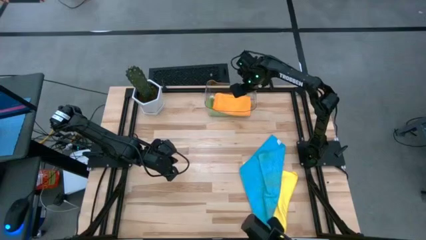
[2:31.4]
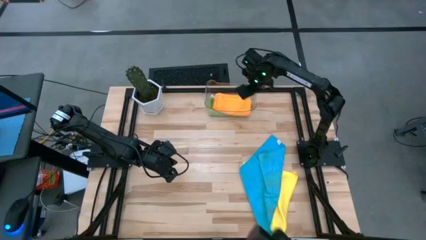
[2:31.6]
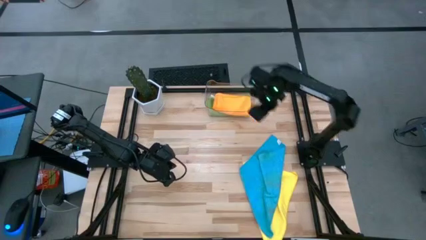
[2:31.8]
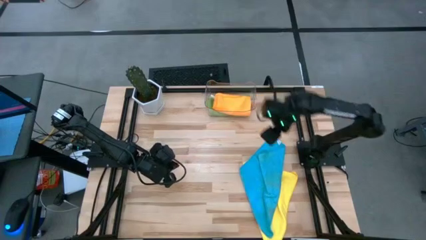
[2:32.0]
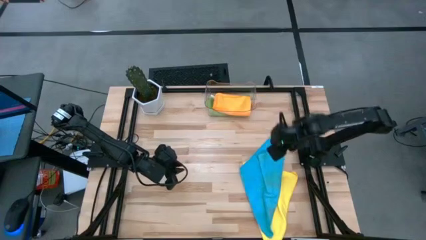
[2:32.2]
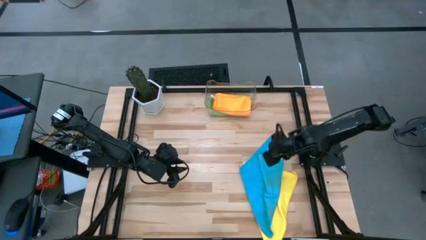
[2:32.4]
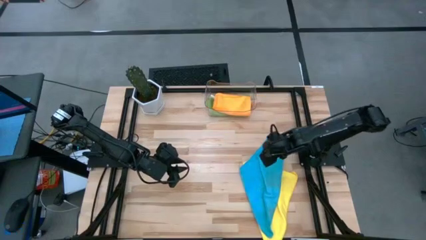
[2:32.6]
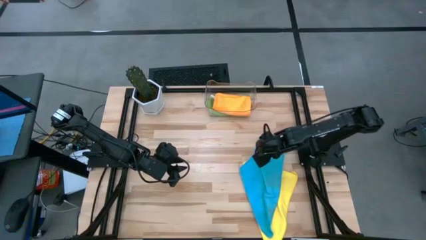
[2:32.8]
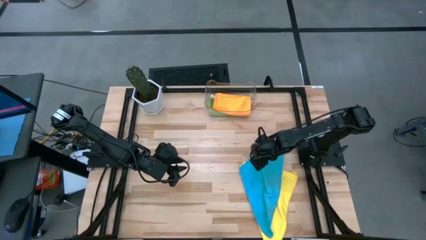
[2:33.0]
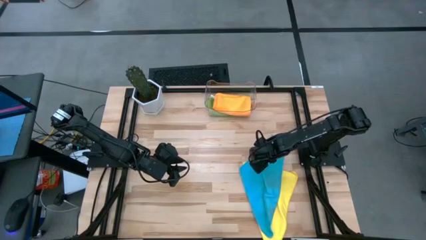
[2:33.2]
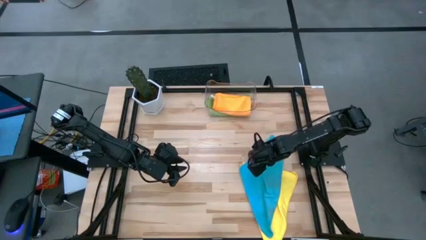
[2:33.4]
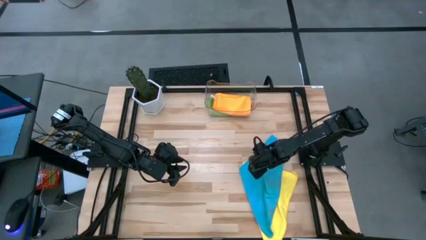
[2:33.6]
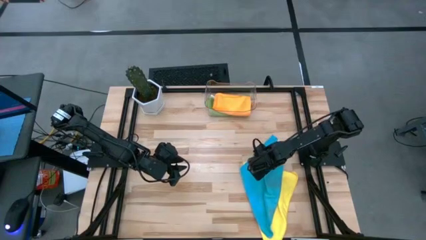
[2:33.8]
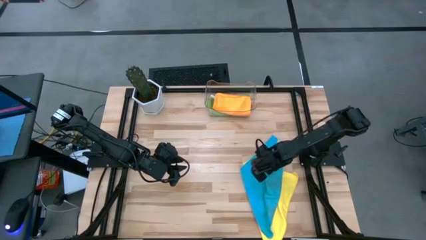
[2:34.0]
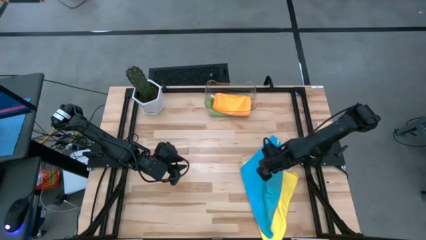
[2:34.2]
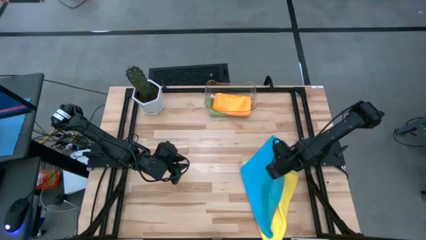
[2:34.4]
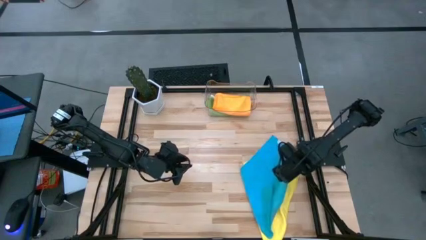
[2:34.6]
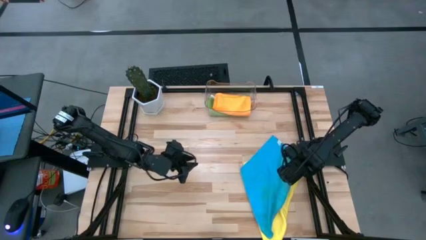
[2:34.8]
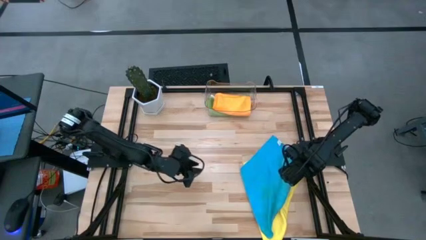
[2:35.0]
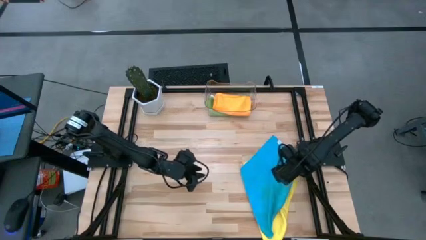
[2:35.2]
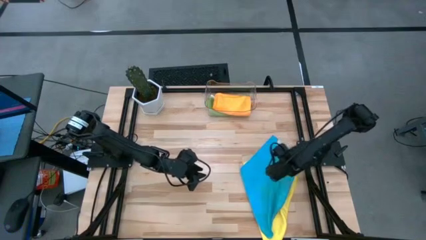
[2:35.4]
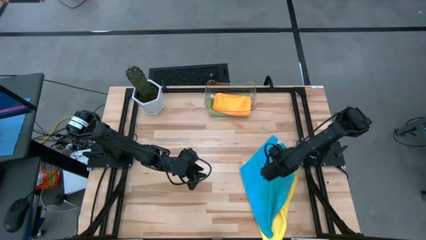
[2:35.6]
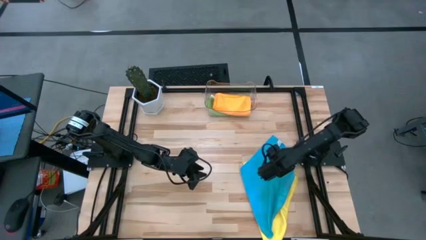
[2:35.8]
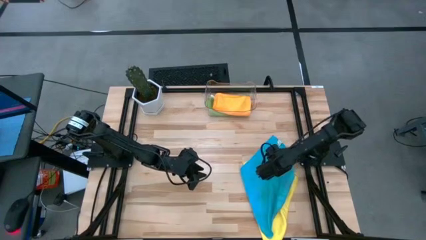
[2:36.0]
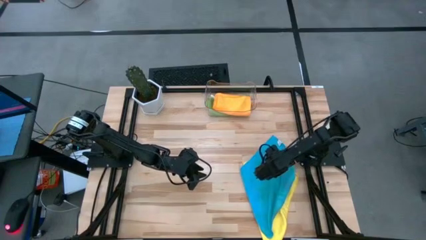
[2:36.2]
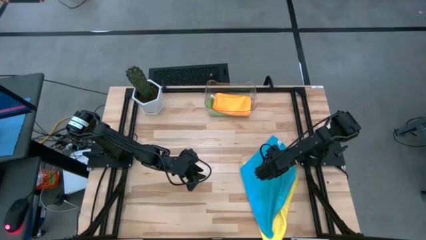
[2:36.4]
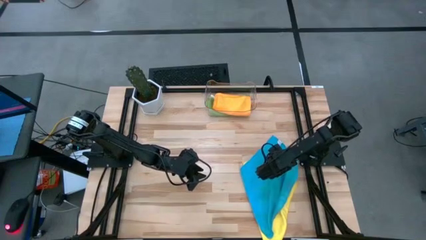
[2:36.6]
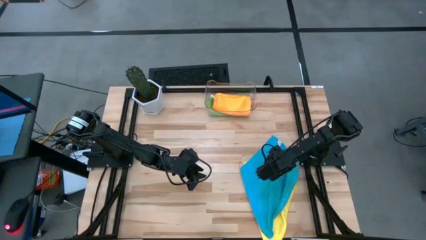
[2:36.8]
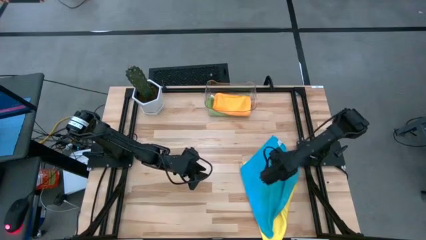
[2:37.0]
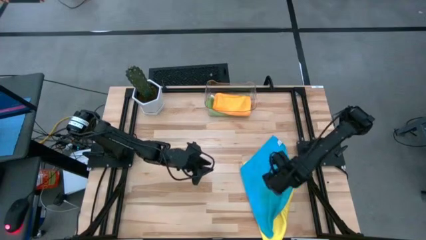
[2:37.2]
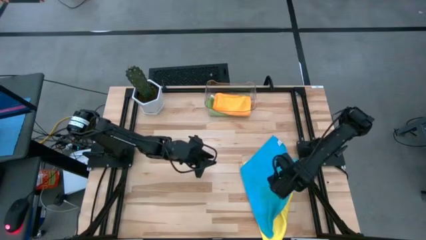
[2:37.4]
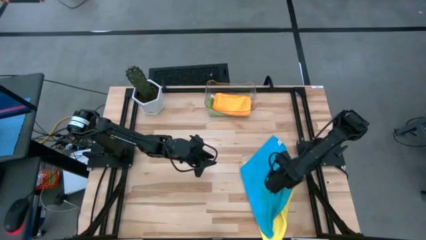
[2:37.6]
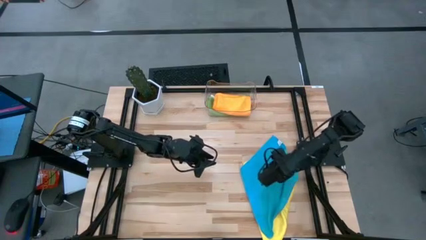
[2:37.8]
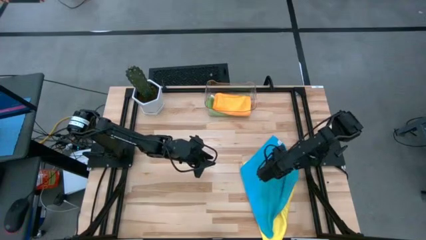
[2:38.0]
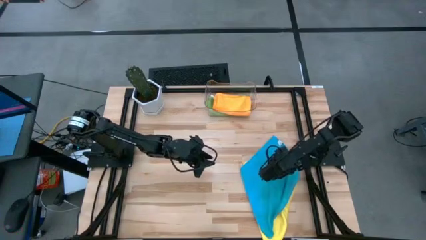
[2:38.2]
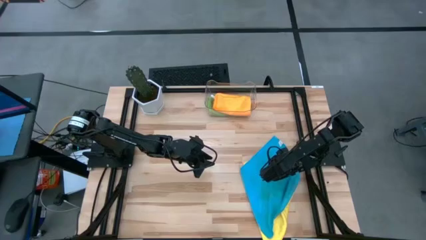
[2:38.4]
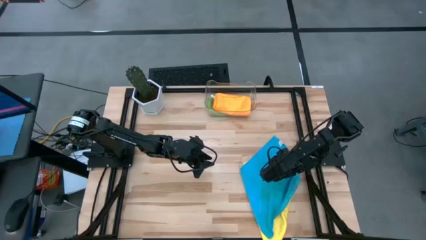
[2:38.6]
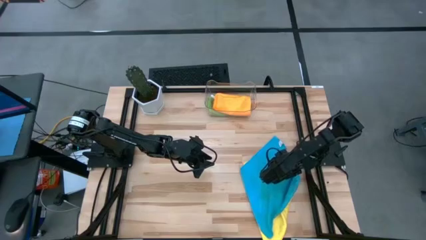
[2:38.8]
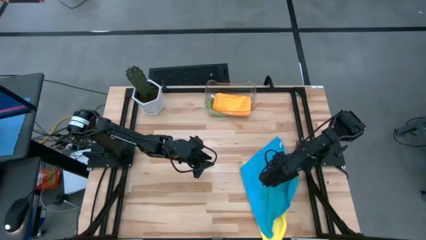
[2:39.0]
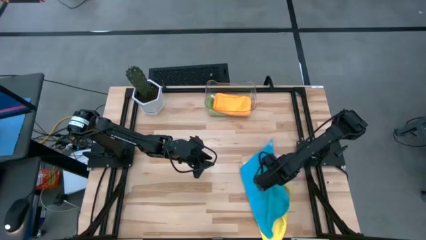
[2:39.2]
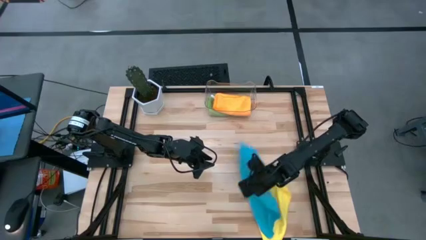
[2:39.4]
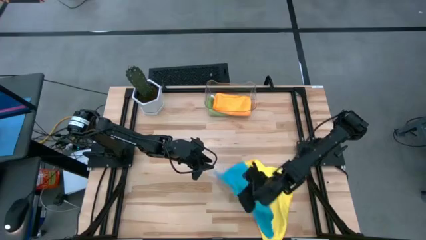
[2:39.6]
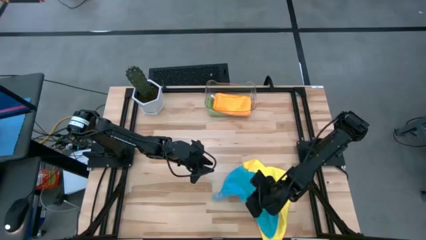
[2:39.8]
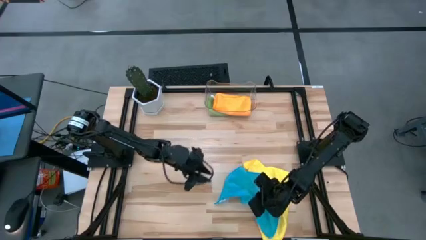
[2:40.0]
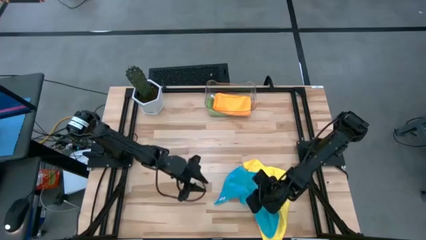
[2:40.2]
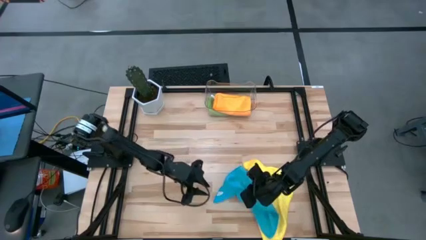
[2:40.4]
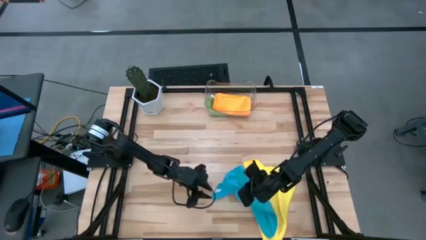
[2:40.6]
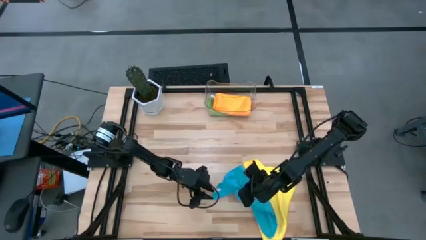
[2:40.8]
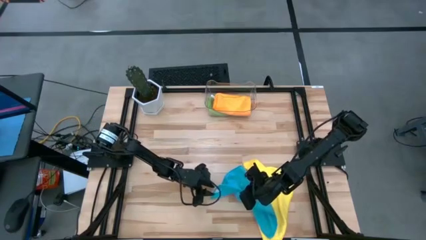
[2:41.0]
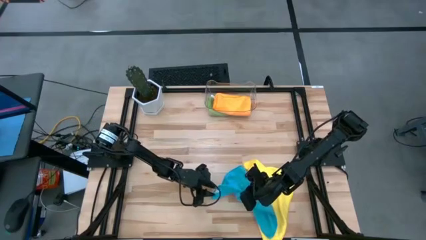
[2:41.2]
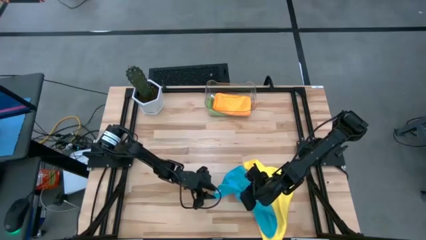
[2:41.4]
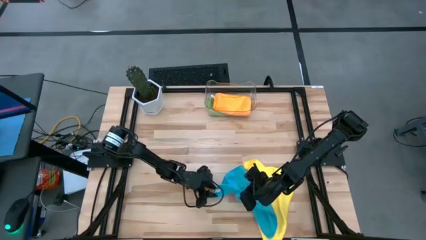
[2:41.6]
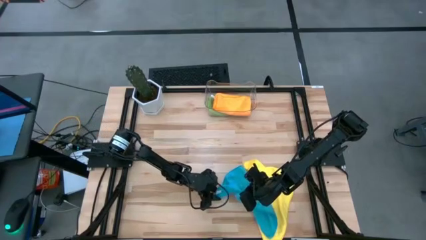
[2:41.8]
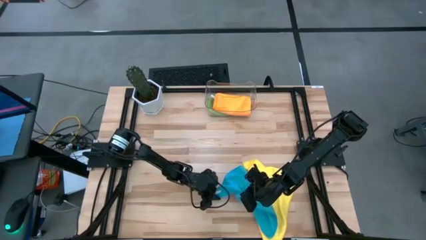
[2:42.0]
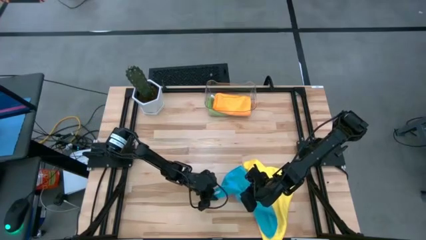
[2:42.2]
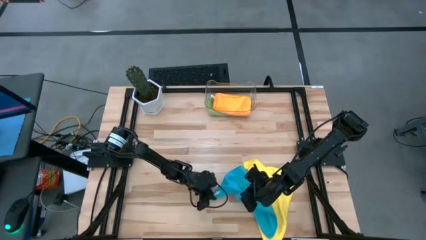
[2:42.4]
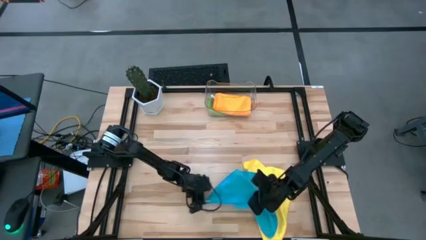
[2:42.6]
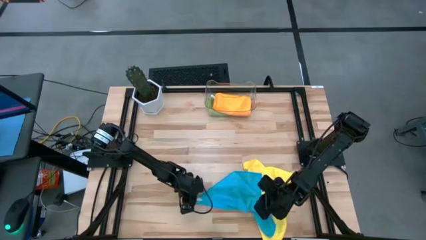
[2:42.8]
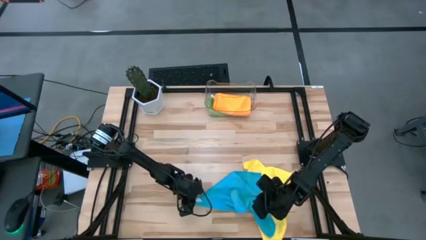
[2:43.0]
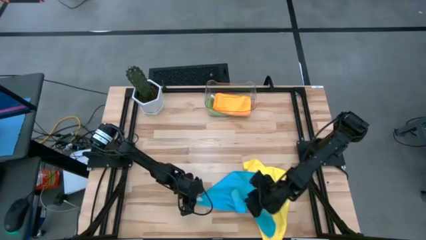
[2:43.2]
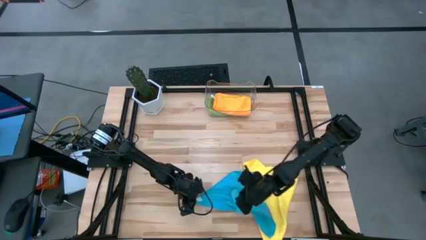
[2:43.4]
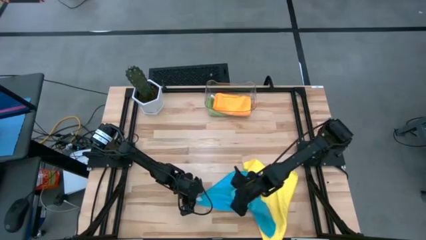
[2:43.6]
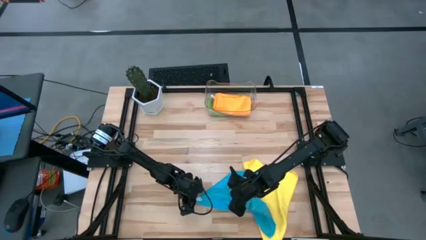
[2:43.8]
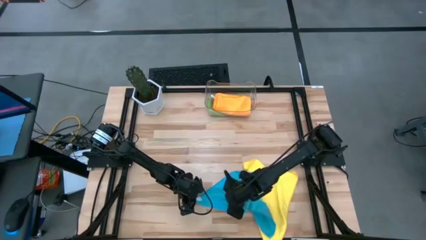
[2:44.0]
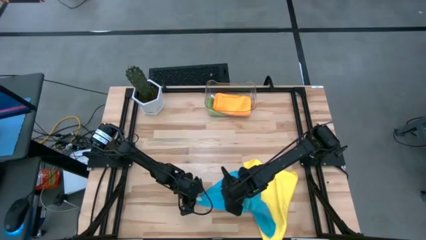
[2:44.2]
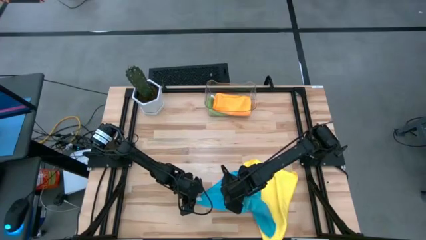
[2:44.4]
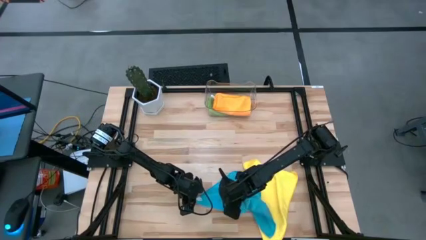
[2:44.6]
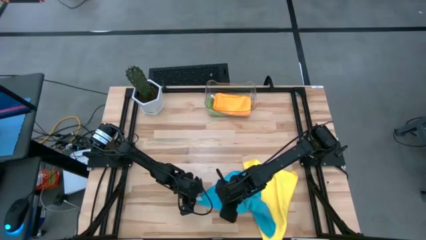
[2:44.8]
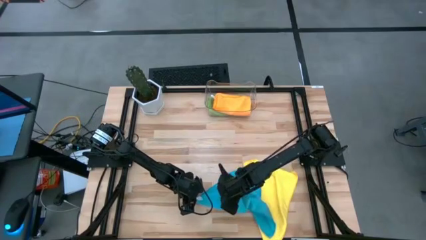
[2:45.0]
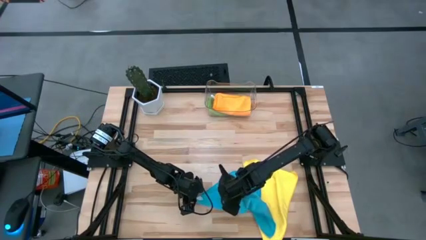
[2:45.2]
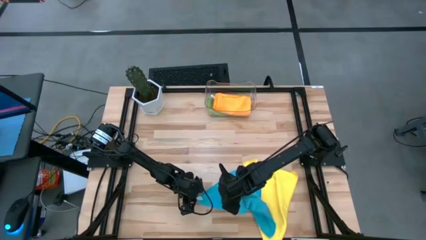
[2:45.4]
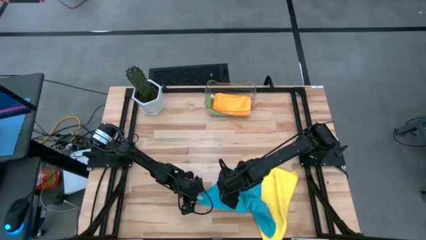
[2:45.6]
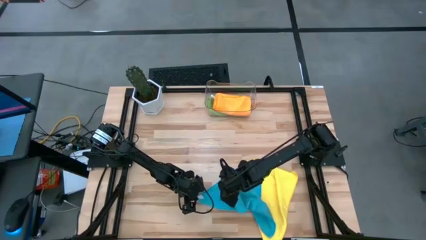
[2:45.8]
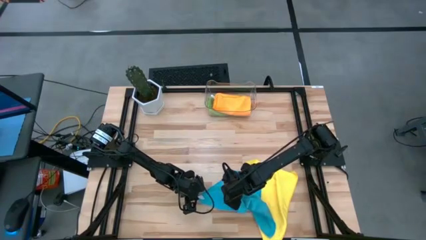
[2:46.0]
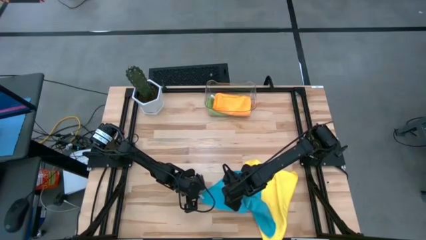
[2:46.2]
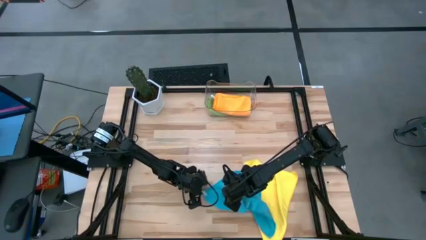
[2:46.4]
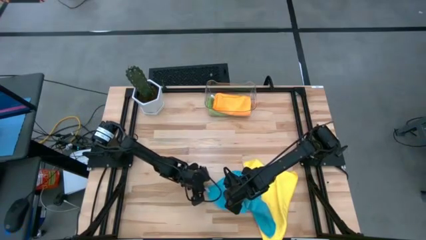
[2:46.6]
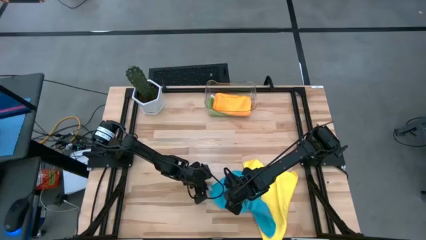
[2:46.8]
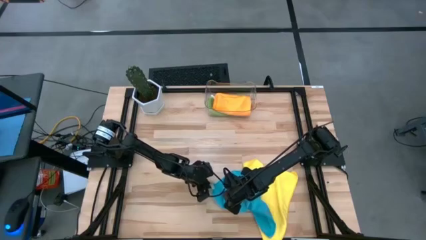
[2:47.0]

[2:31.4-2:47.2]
Task: Fold microfiber towels
Fold the blue towel
